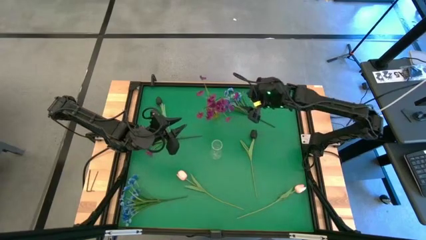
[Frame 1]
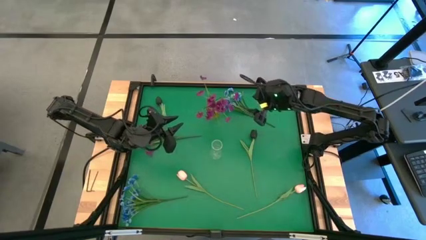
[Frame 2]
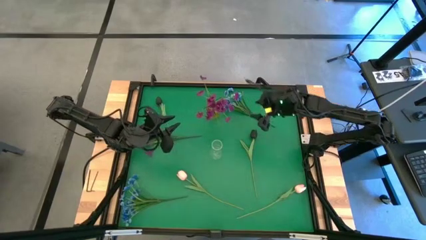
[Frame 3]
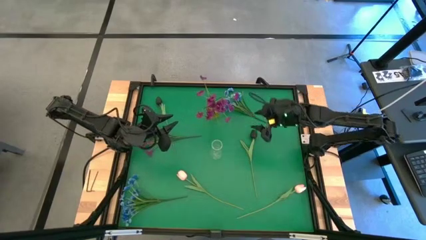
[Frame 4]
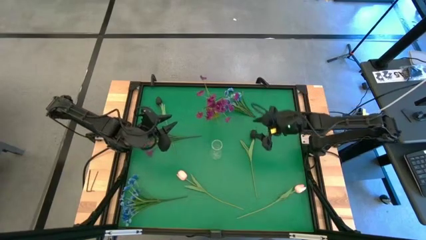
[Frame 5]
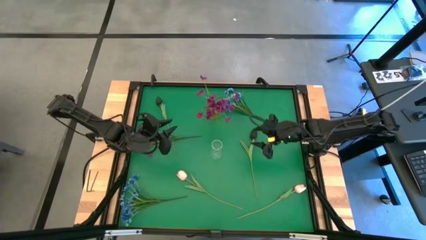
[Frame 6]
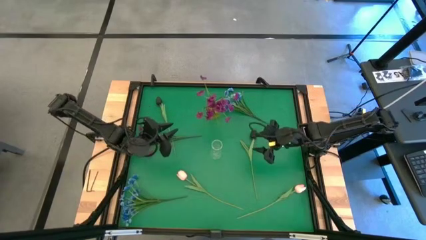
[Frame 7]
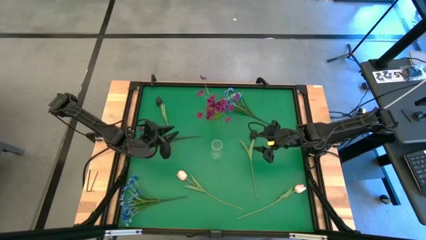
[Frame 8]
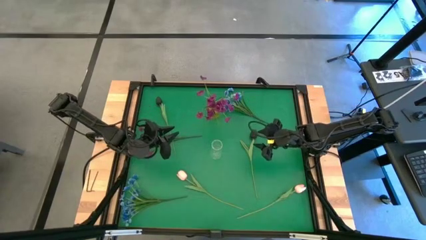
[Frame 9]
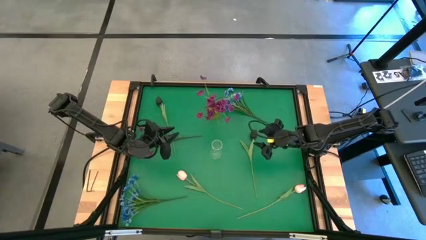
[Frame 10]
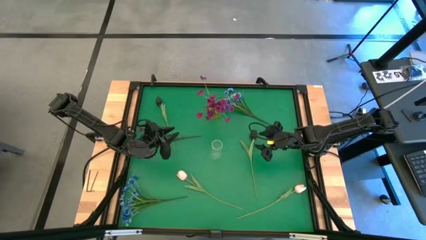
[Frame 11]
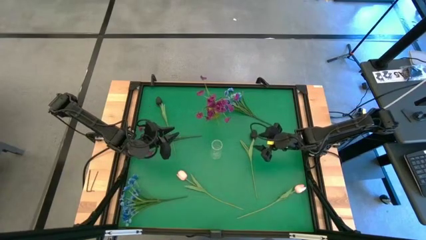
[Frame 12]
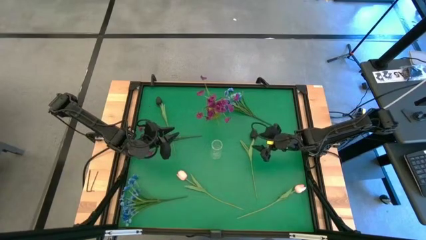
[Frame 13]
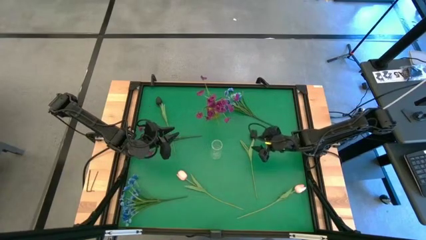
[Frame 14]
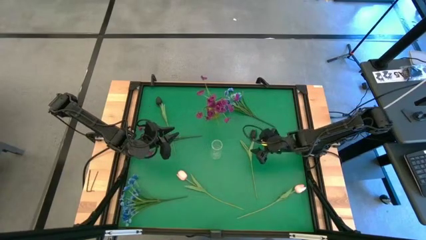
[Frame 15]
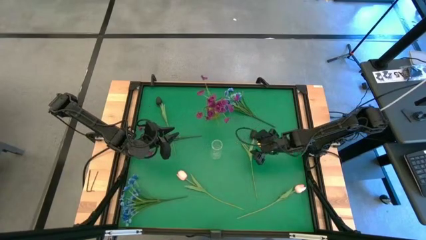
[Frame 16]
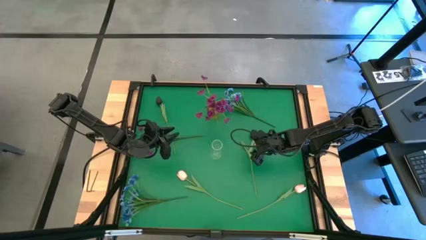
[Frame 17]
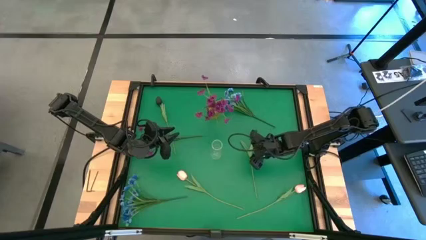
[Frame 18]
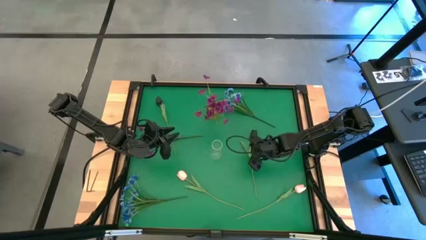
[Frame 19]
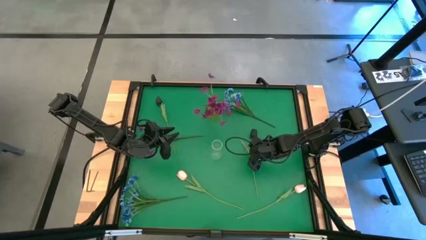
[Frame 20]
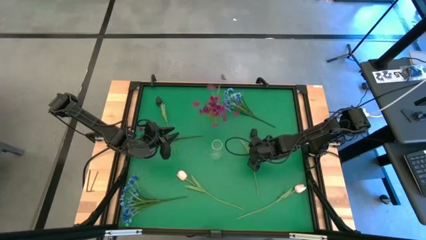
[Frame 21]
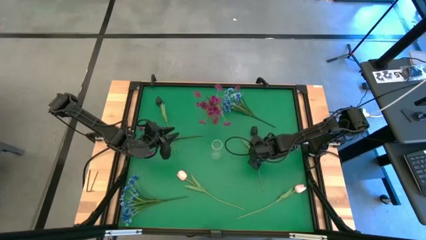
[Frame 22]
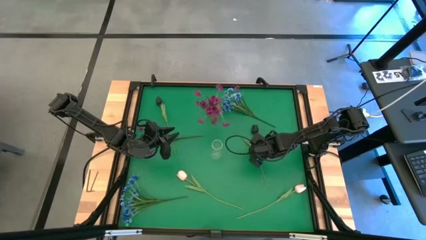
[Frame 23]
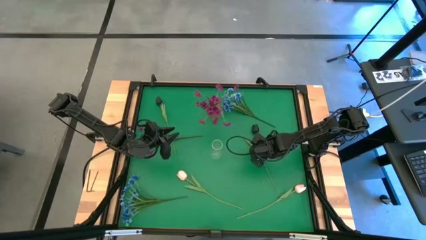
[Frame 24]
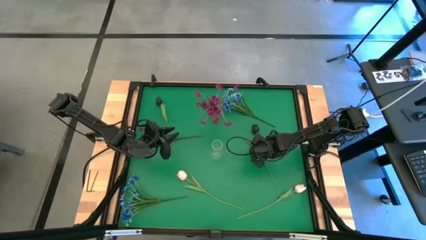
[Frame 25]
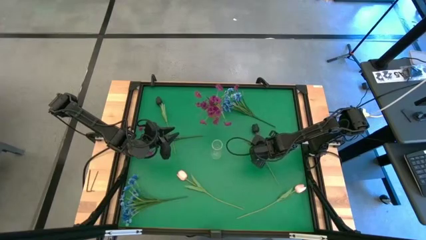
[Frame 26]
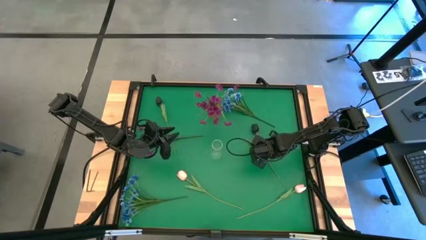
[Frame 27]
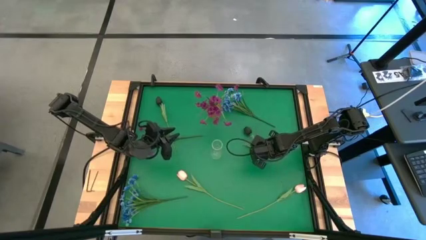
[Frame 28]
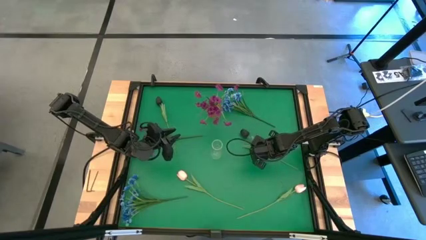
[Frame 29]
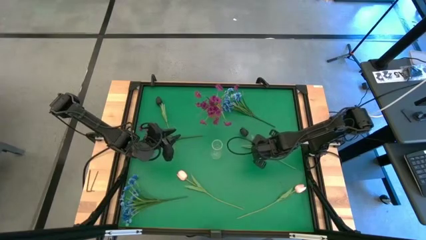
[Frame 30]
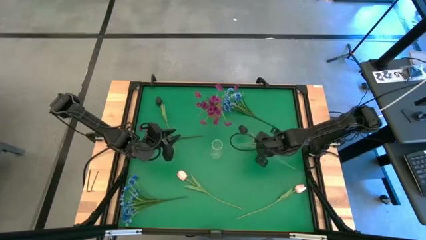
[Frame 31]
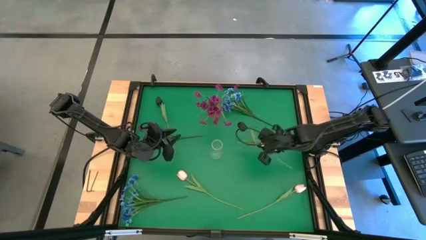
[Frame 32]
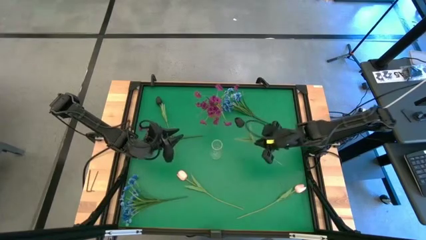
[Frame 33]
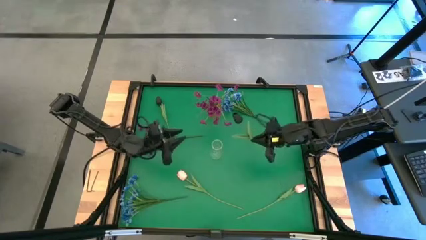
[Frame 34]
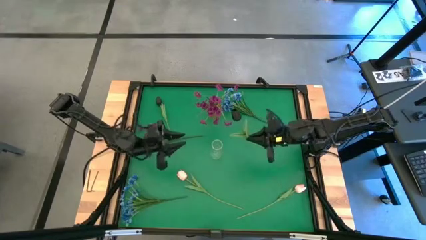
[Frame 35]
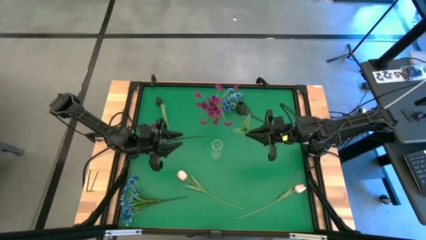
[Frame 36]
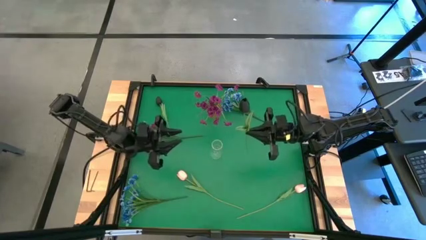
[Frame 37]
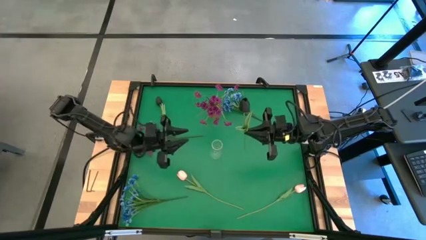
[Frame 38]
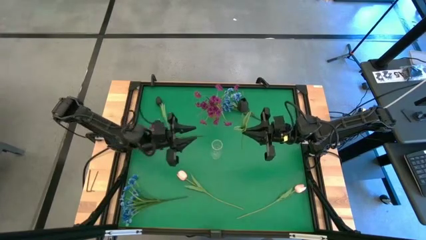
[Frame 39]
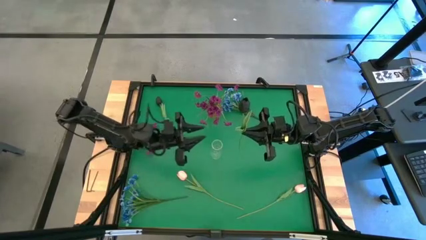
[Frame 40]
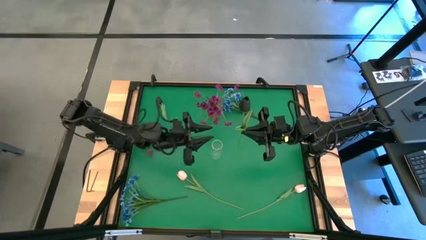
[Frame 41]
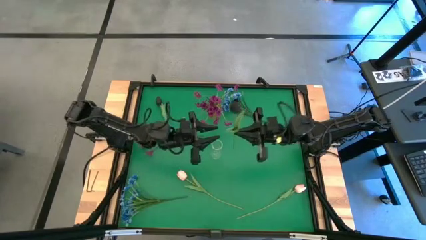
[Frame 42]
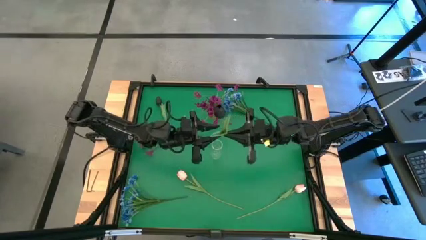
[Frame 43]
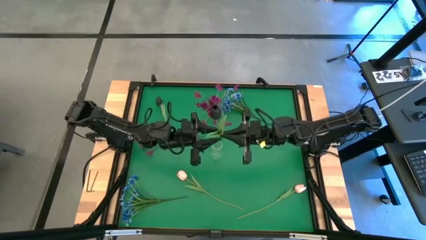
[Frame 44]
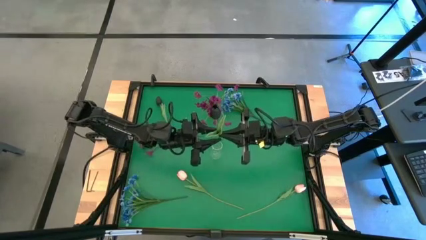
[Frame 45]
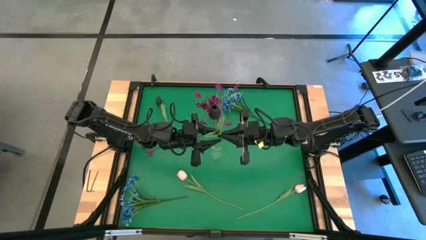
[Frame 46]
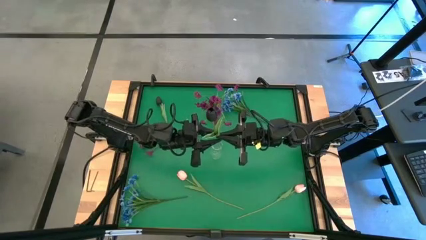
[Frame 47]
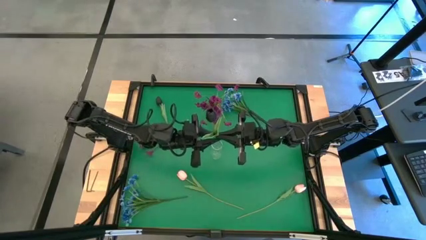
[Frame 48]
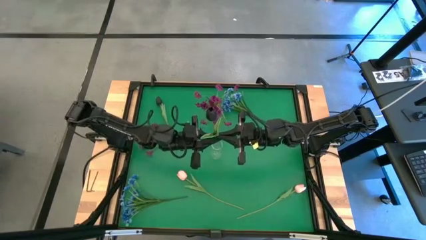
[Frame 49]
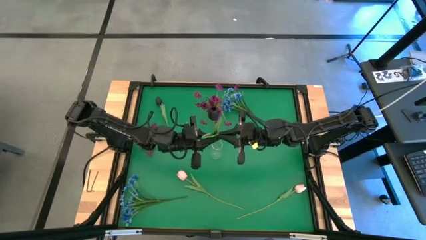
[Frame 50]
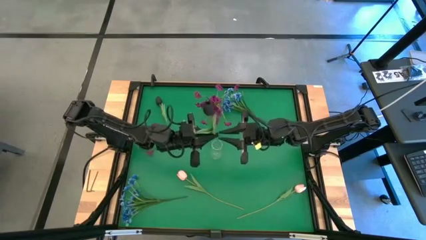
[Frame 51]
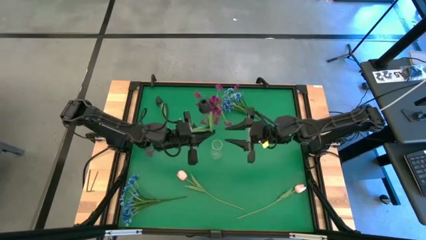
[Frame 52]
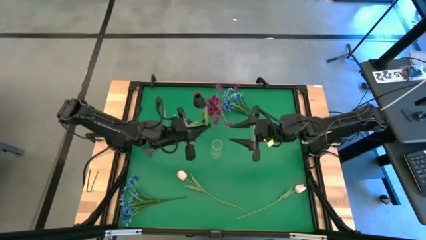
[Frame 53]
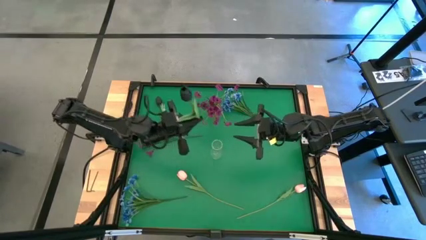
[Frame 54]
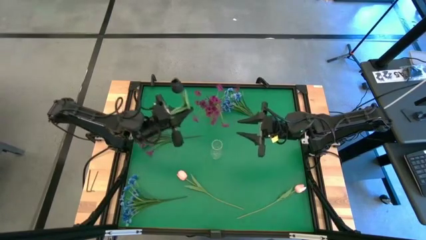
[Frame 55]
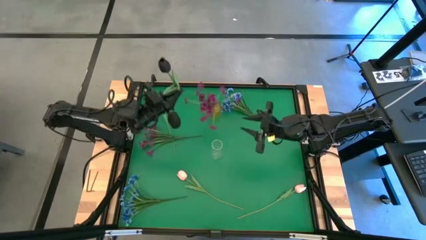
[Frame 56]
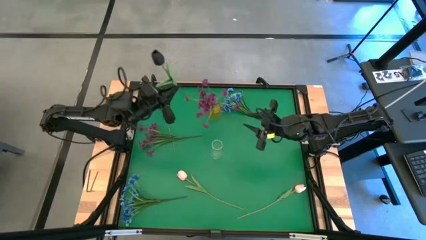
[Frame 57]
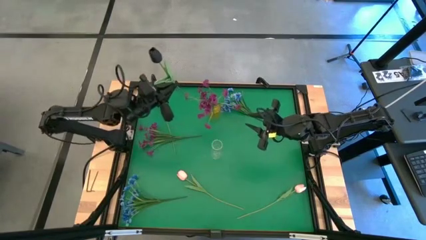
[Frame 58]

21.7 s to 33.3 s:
Task: Sort flowers into vase by color
Put the bottom flowers into the yellow vase

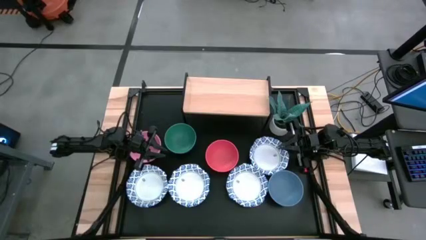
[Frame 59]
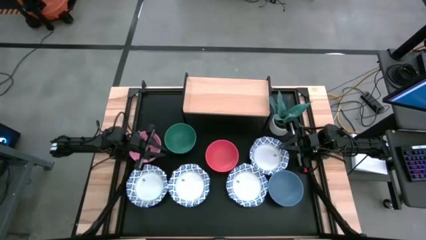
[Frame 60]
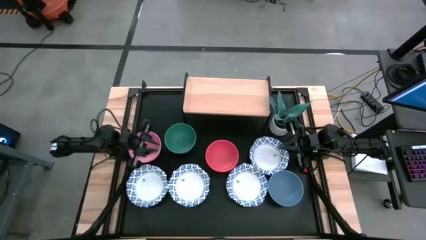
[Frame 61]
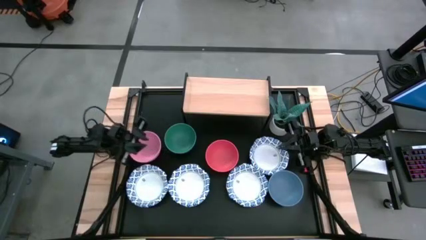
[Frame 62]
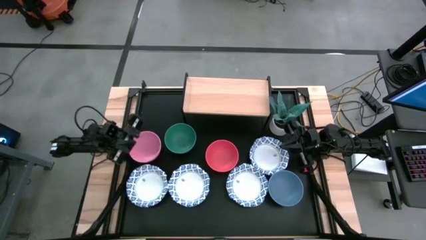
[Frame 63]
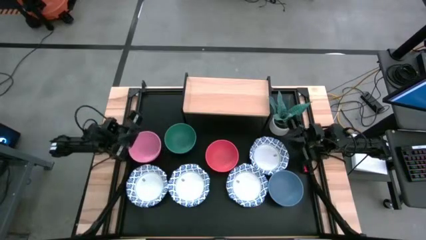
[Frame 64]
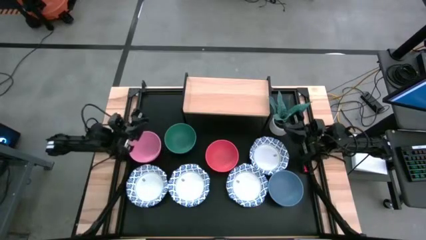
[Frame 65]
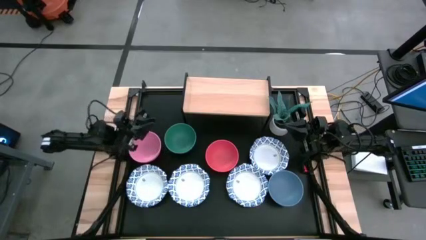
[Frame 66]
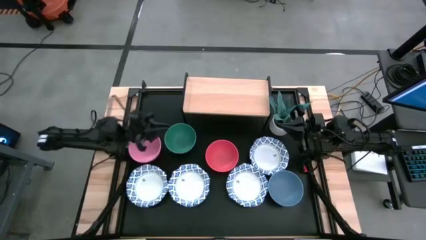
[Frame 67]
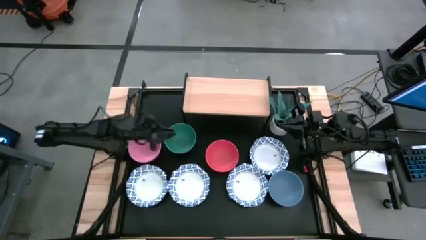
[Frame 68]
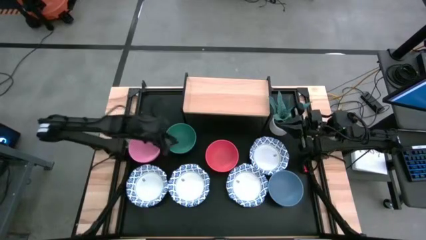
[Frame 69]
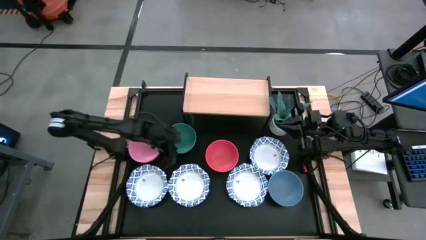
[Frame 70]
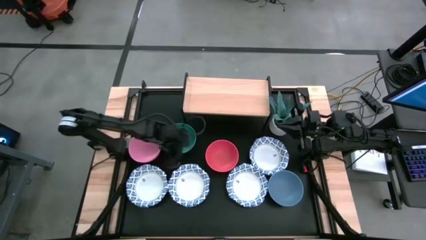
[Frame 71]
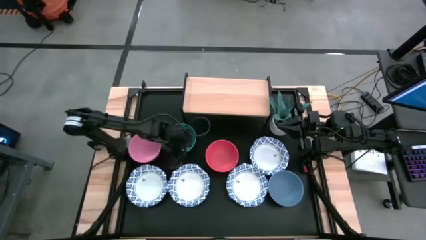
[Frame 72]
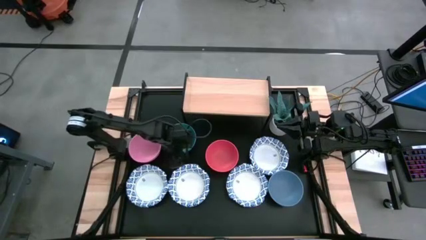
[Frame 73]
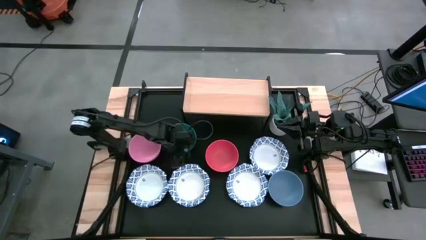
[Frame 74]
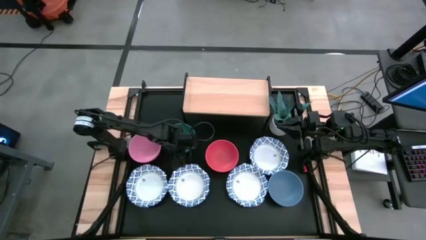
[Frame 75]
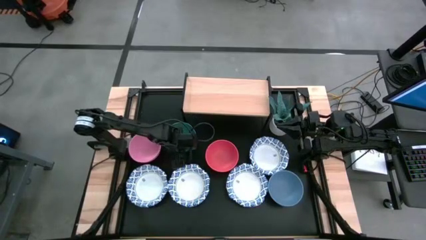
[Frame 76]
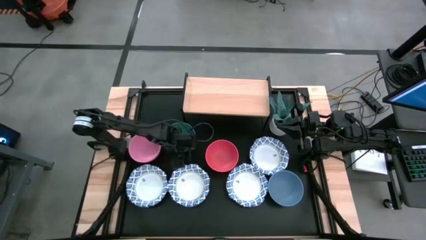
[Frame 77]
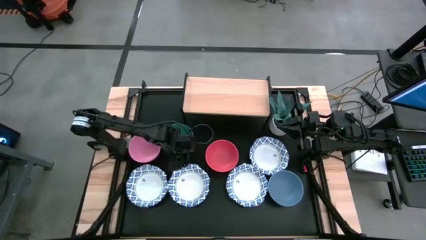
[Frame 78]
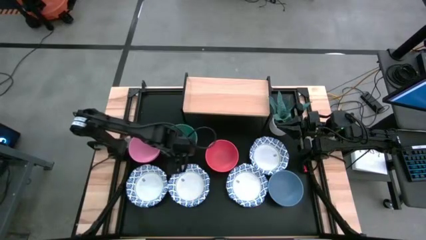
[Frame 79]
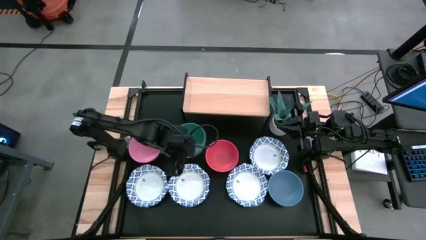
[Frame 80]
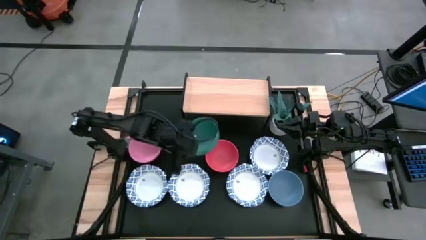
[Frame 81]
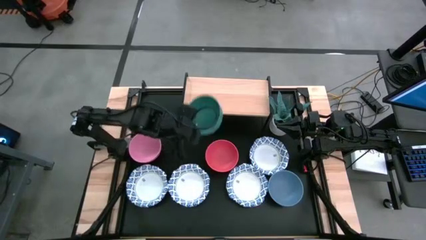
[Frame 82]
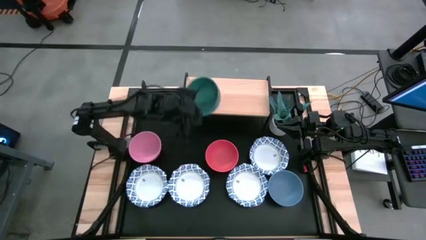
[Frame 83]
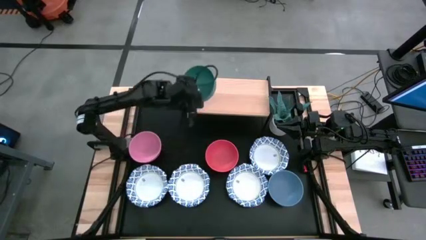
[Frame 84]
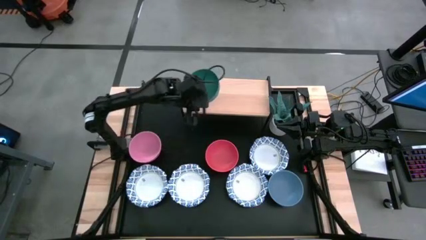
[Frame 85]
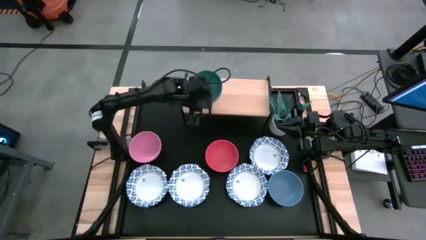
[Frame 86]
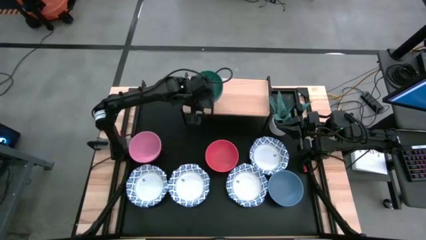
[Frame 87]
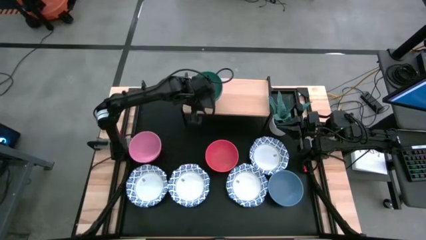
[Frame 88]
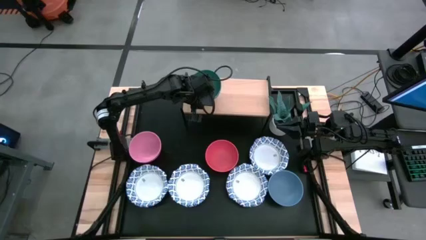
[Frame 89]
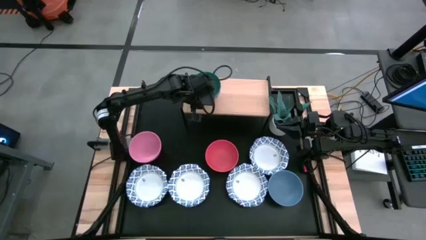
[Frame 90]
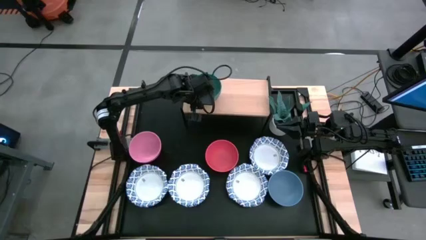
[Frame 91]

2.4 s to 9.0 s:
Task: Place and stack bowls onto a shelf
Put the green bowl on the shelf
